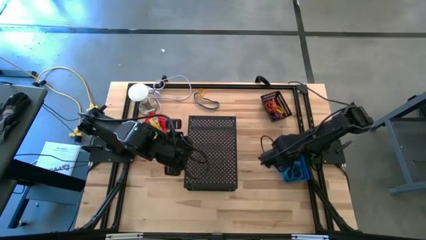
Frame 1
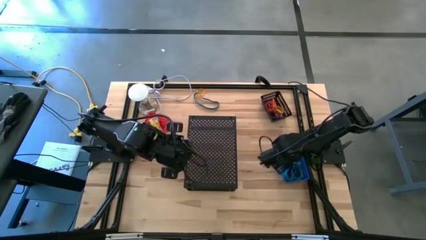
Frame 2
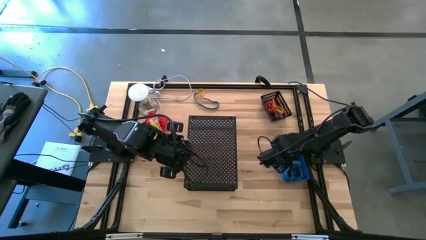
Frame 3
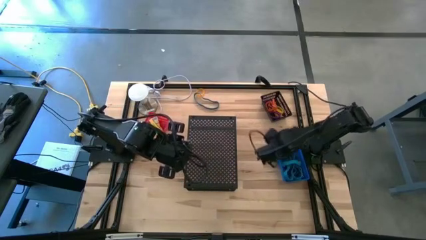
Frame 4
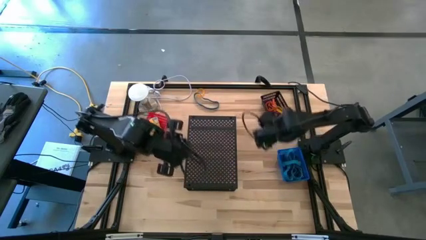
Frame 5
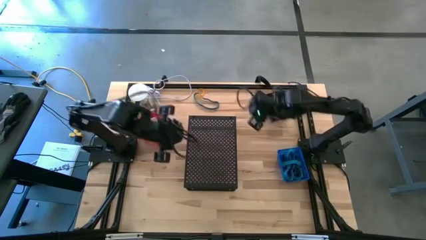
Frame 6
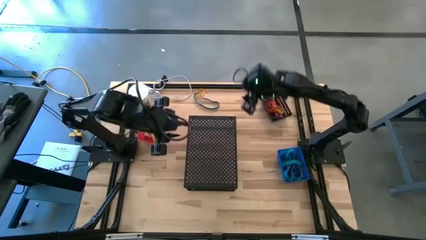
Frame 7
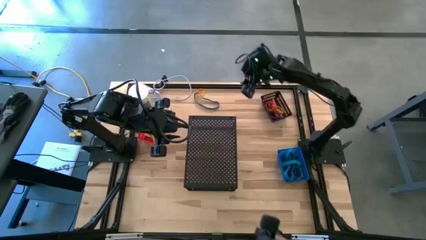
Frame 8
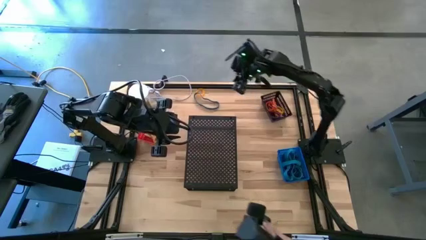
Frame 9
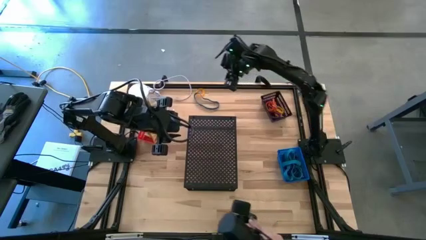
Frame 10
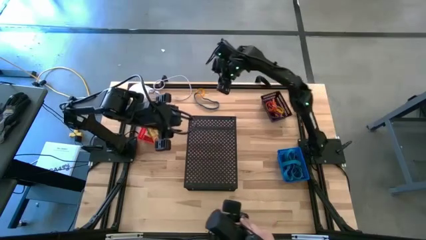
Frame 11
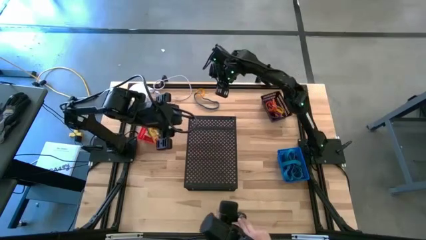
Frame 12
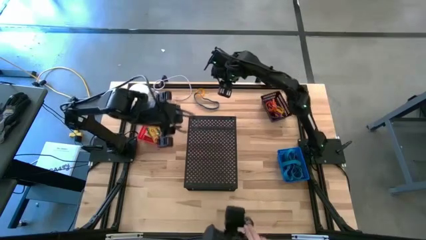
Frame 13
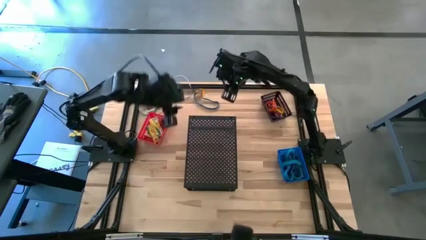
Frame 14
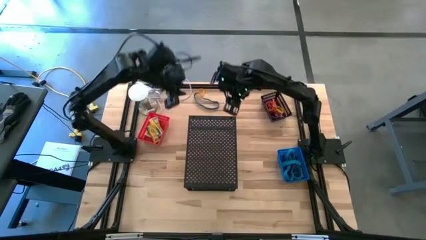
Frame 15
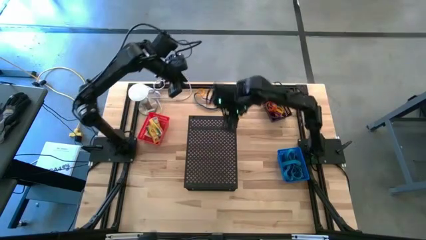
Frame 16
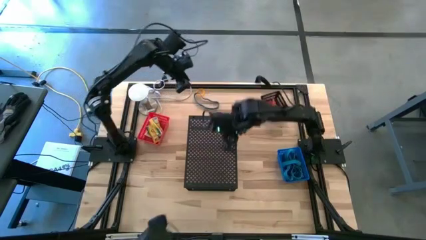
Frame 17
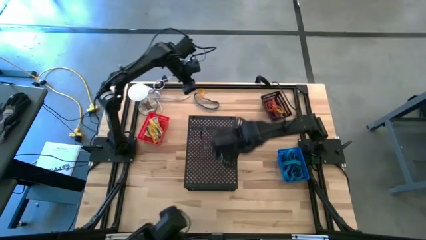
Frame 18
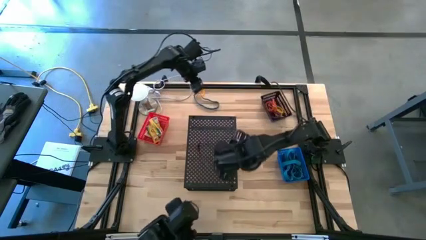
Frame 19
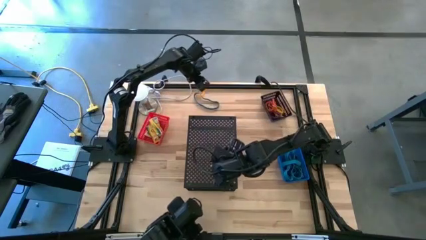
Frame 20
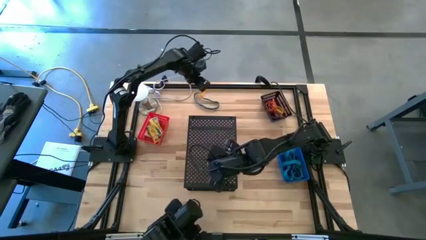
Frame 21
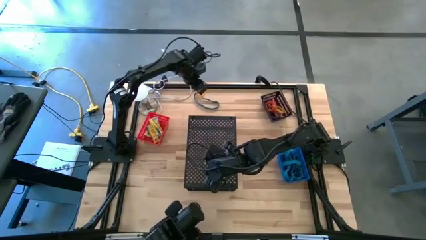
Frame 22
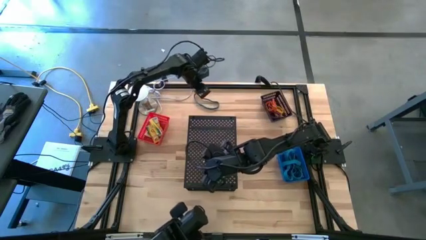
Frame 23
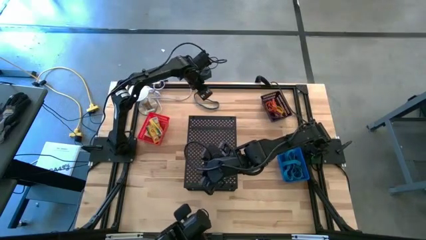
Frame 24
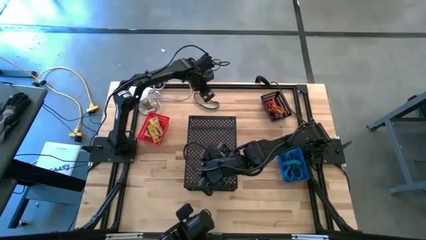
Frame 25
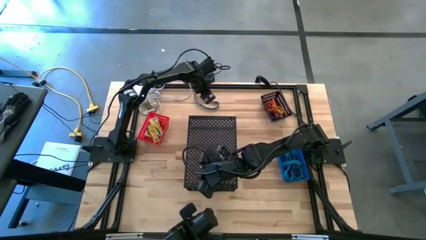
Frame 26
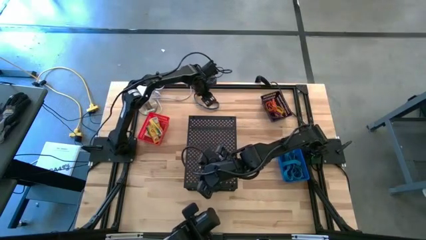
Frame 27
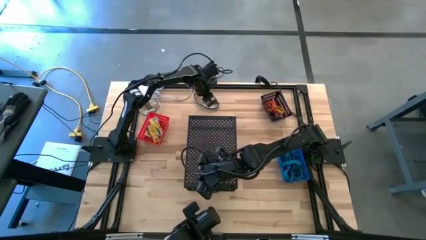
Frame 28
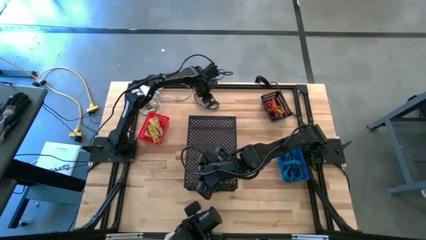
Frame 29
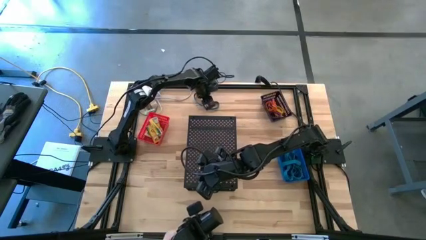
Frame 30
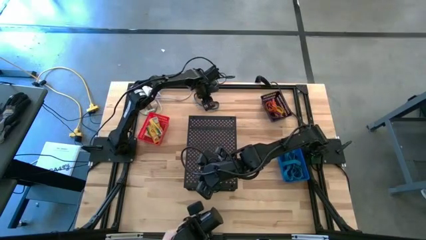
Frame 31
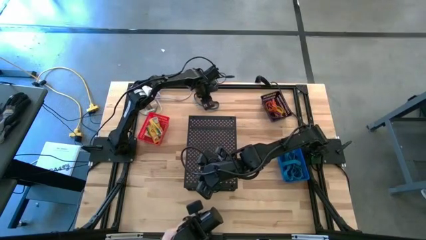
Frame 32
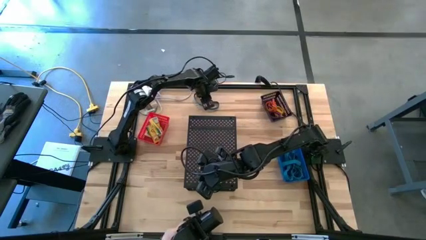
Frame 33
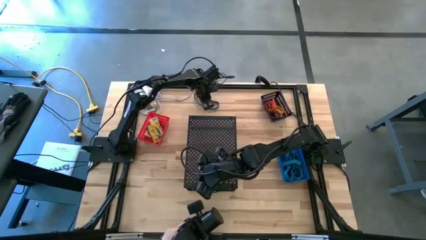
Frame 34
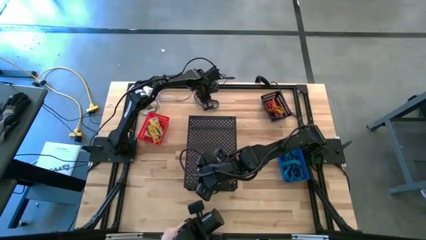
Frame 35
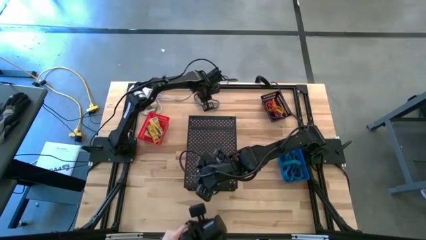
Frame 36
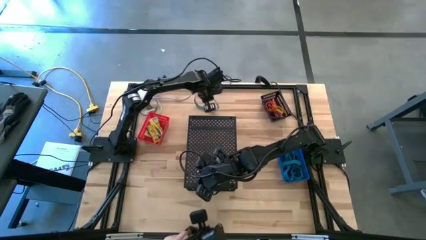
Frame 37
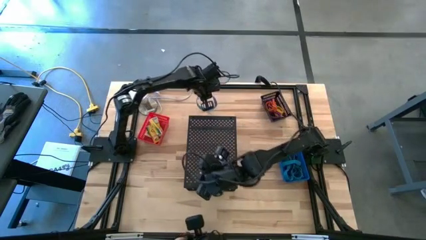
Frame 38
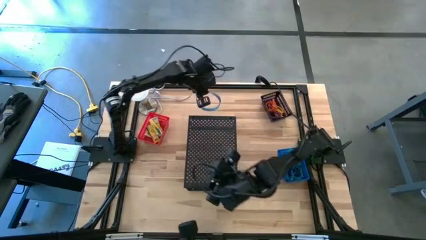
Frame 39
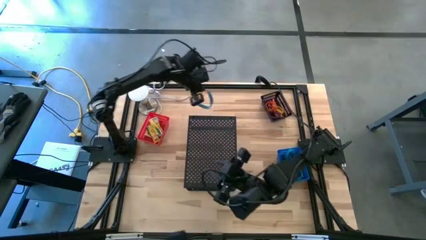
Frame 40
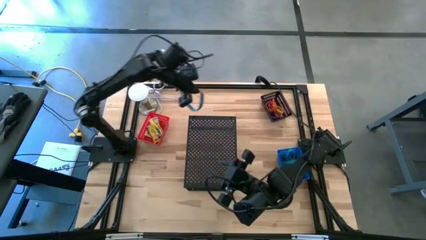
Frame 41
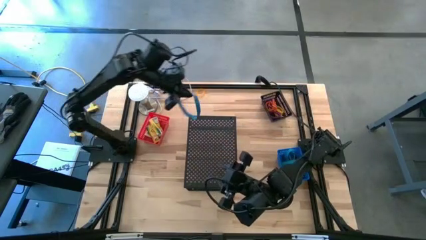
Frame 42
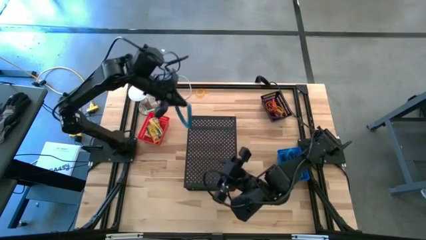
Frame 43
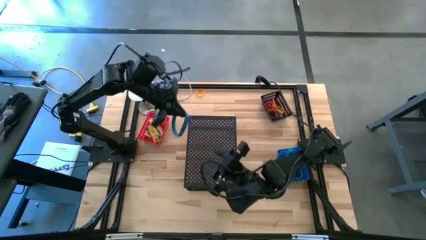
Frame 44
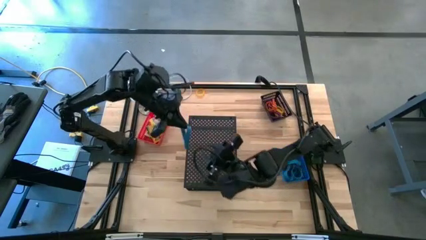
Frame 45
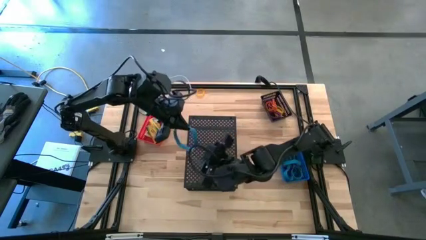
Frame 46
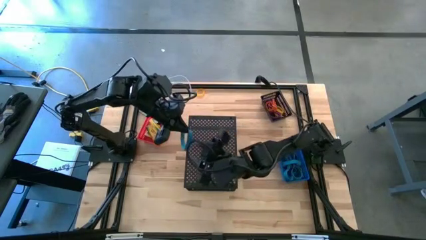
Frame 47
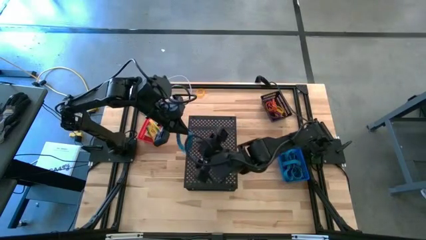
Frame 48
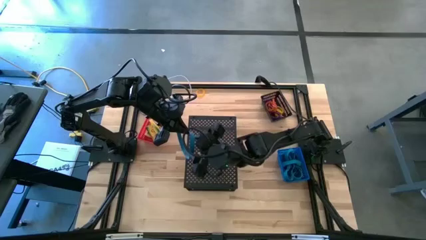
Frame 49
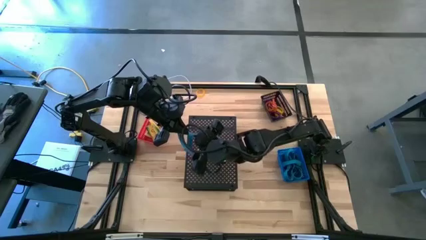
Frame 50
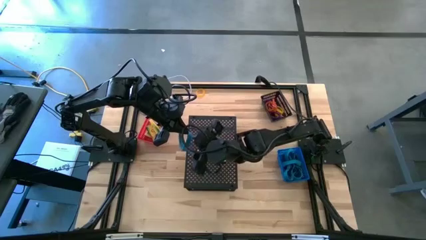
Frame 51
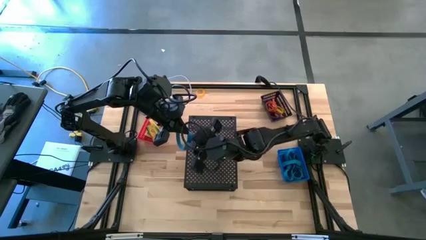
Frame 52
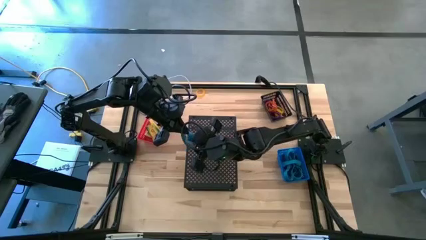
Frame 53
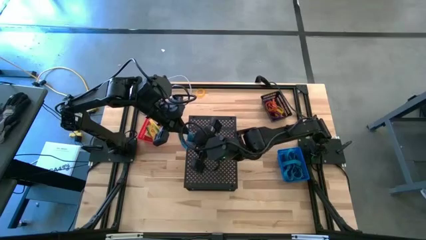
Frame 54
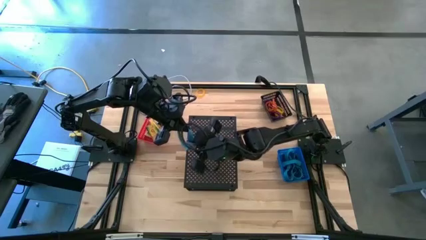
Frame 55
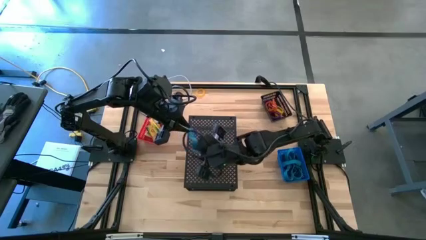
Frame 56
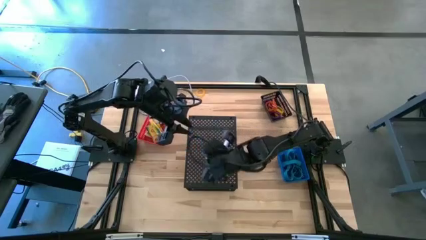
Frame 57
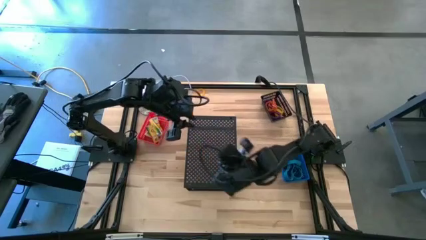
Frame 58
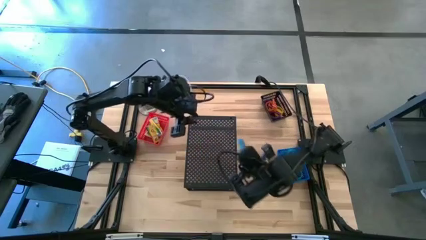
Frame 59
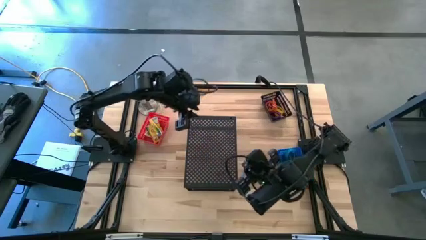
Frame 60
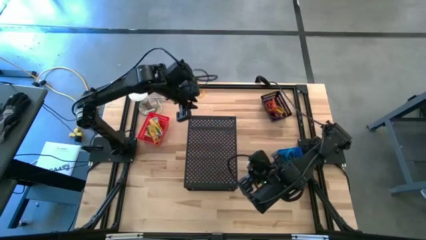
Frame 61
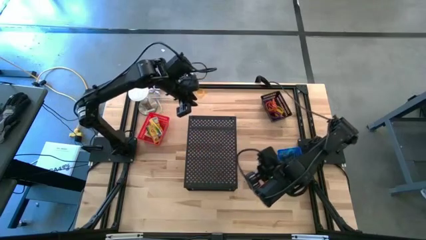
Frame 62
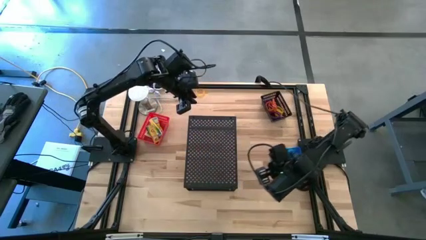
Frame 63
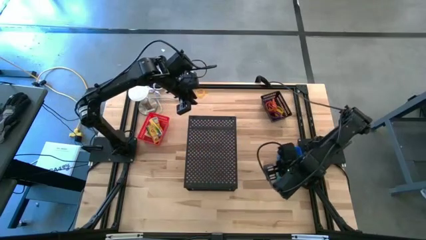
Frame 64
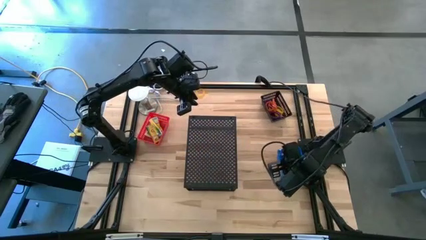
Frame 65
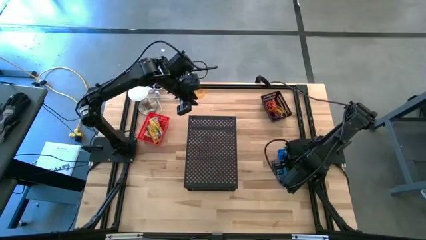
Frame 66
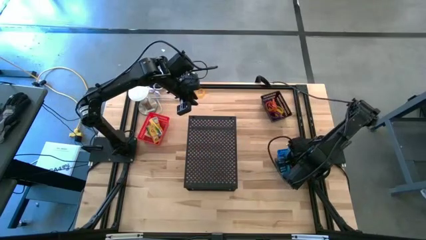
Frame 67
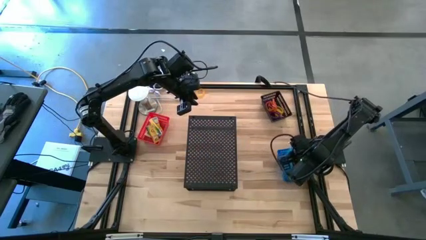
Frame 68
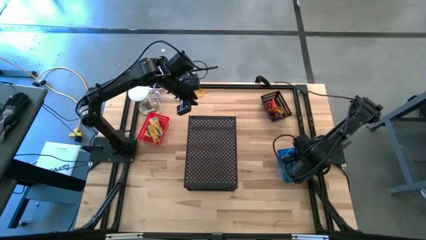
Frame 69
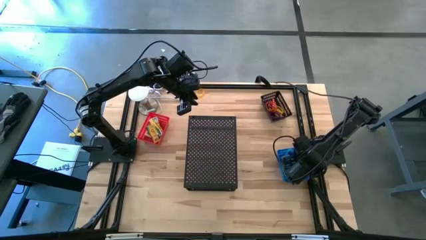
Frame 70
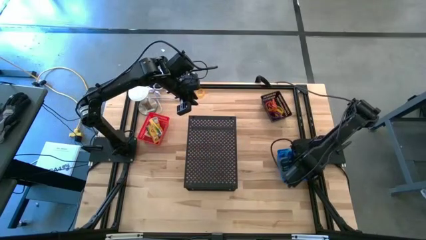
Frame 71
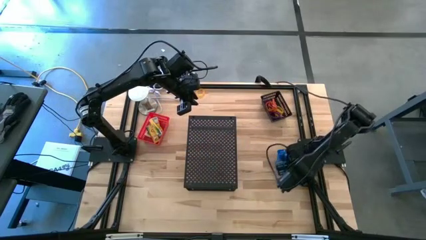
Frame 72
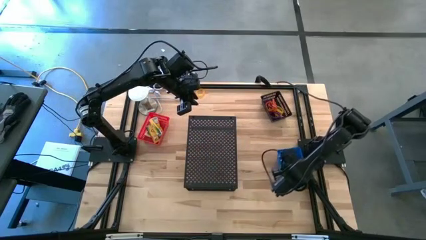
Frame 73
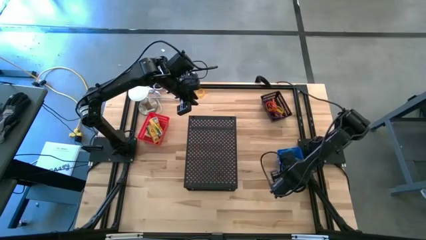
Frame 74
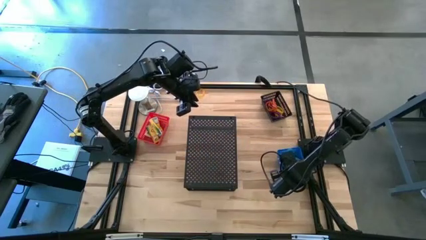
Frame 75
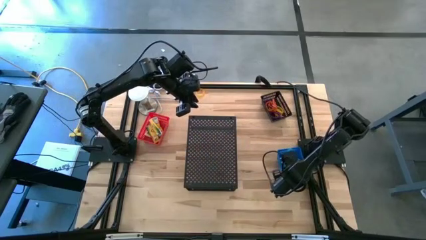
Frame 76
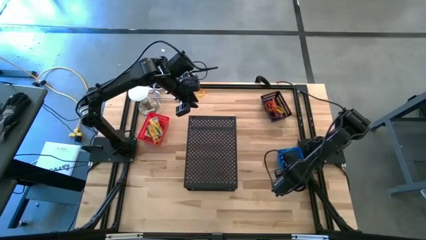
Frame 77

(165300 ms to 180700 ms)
Task: Pick & Place Office Desk Supplies
Put the blue rubber band into the blue bin
